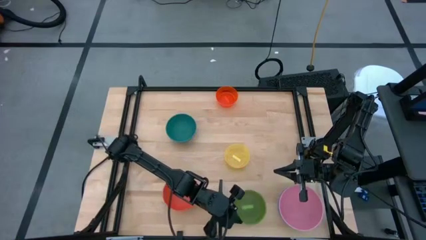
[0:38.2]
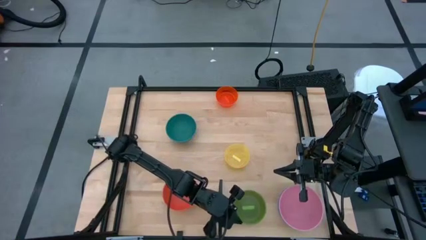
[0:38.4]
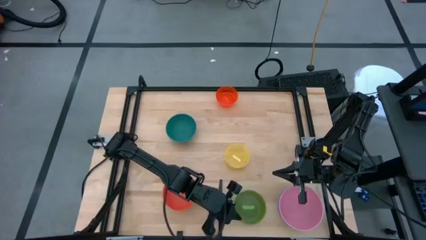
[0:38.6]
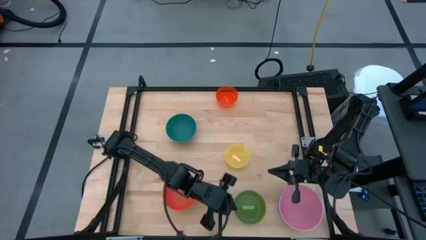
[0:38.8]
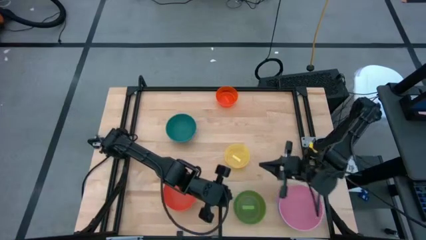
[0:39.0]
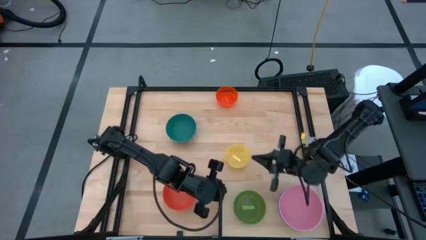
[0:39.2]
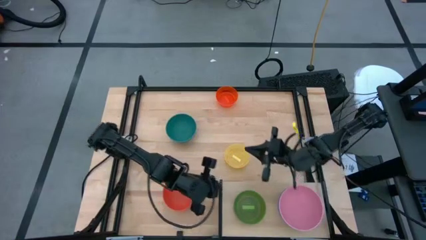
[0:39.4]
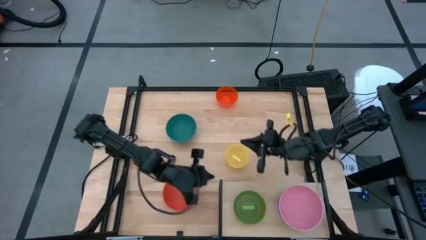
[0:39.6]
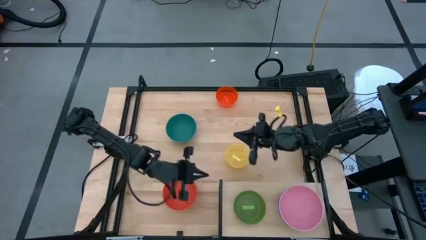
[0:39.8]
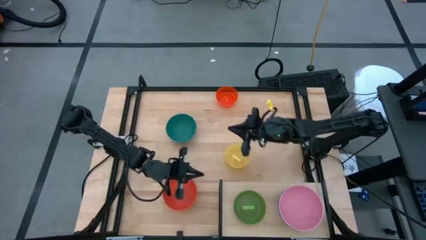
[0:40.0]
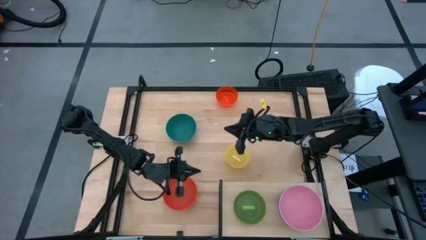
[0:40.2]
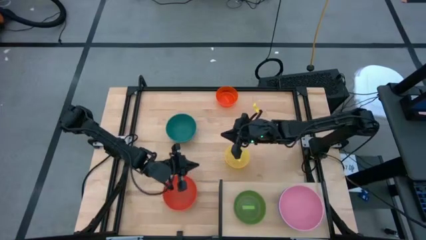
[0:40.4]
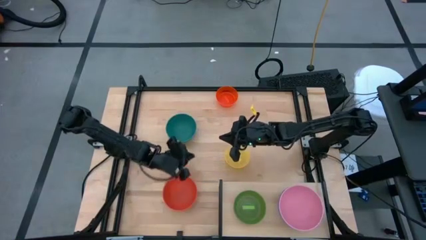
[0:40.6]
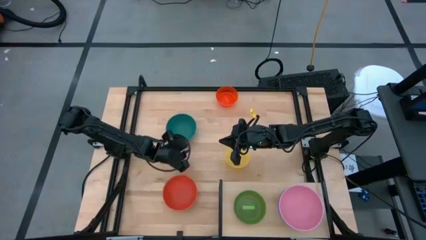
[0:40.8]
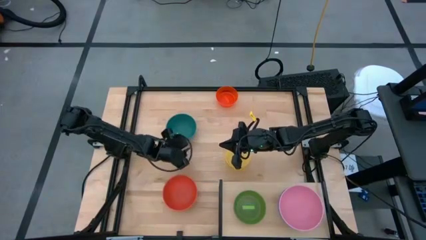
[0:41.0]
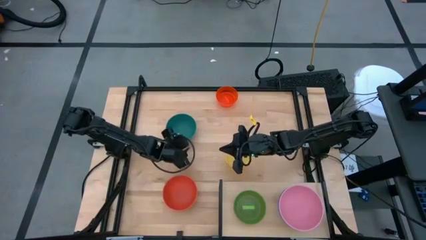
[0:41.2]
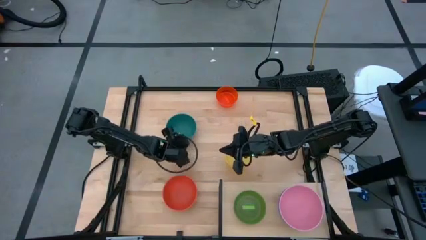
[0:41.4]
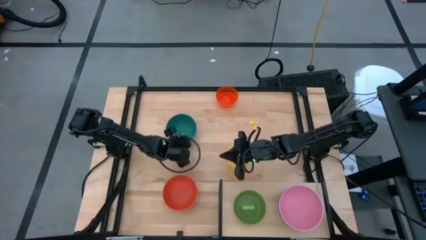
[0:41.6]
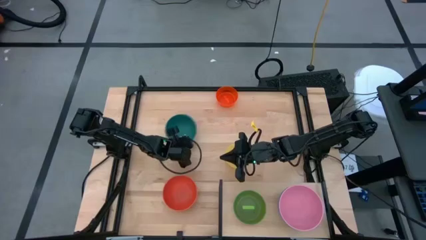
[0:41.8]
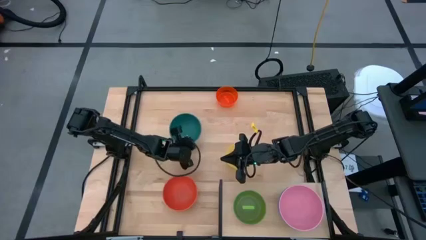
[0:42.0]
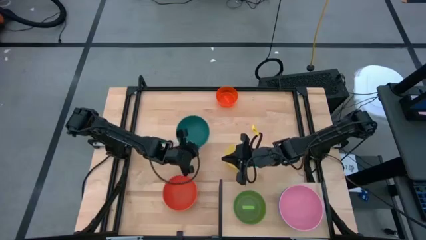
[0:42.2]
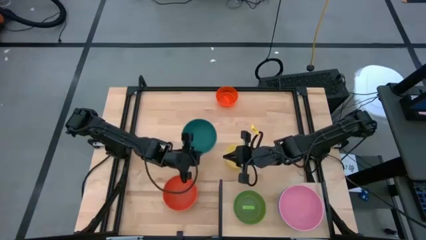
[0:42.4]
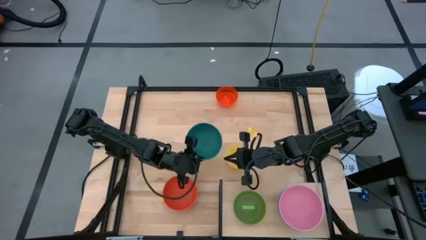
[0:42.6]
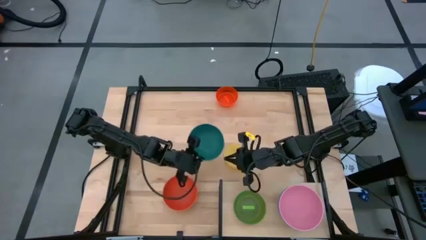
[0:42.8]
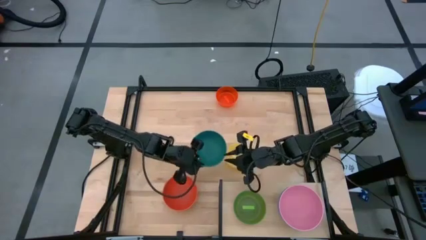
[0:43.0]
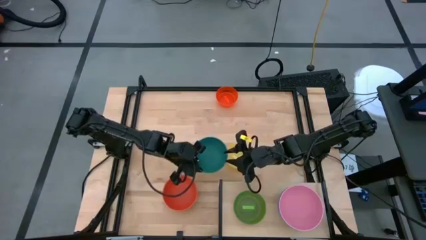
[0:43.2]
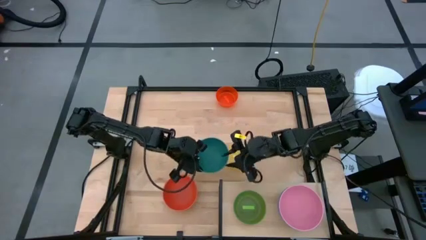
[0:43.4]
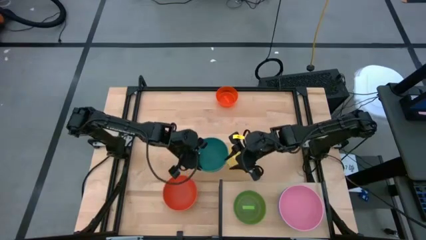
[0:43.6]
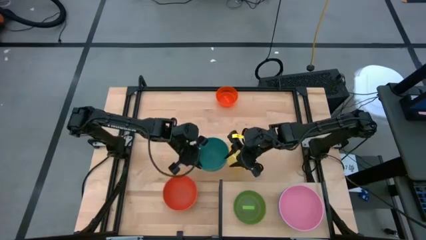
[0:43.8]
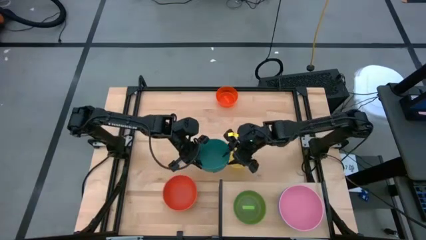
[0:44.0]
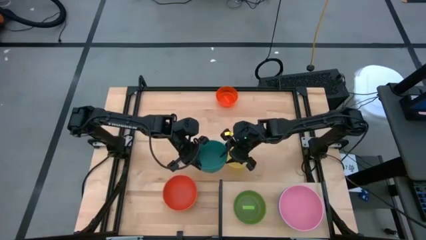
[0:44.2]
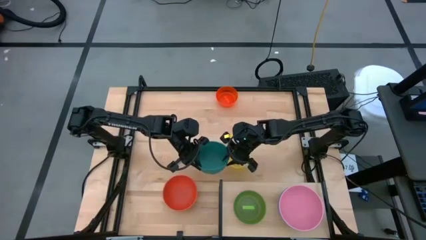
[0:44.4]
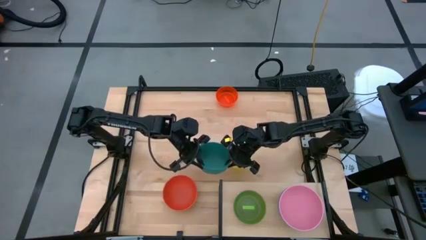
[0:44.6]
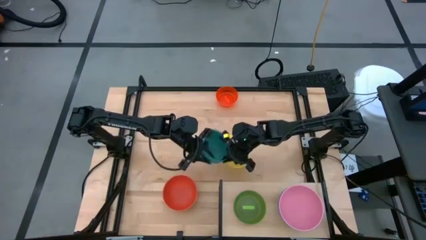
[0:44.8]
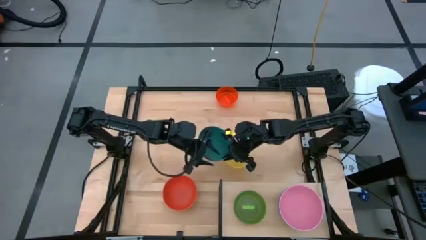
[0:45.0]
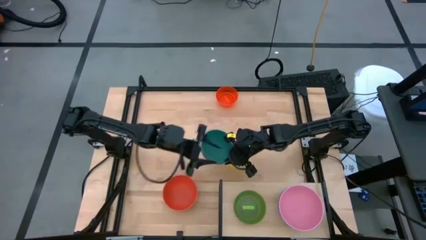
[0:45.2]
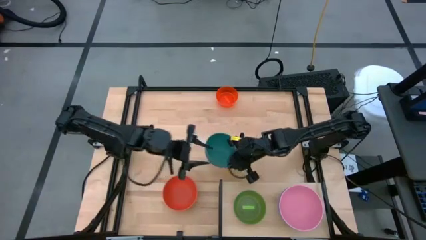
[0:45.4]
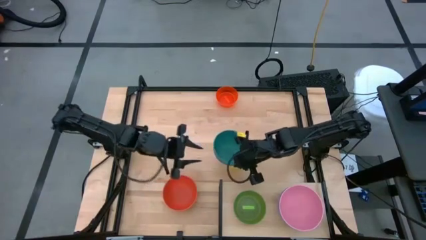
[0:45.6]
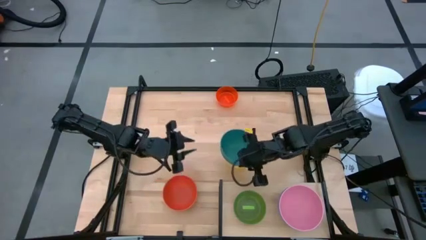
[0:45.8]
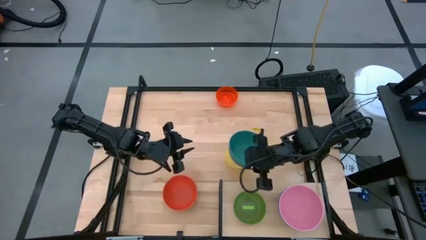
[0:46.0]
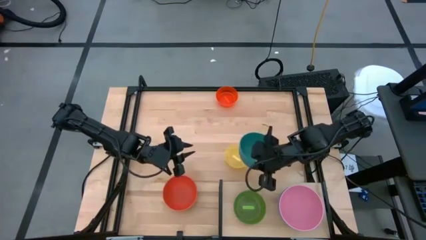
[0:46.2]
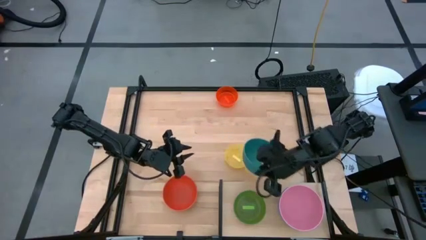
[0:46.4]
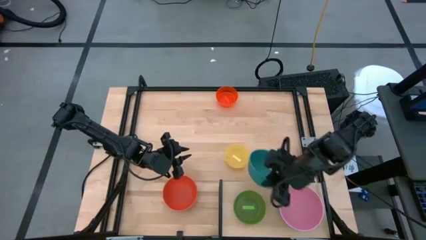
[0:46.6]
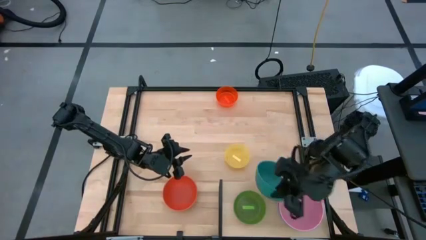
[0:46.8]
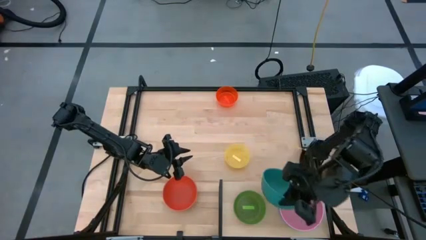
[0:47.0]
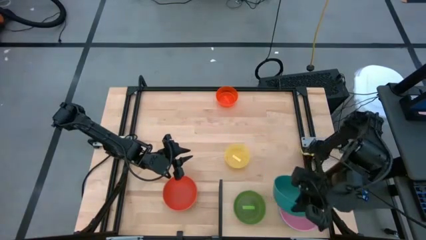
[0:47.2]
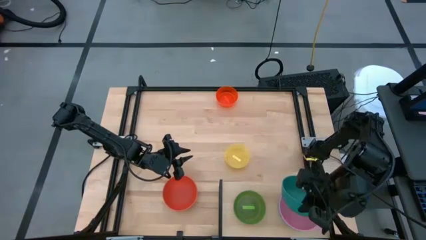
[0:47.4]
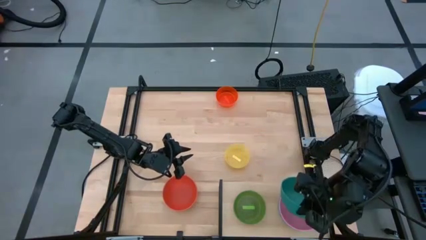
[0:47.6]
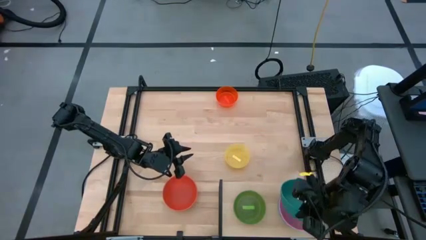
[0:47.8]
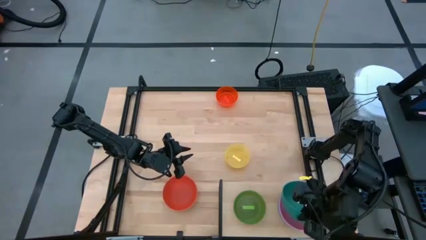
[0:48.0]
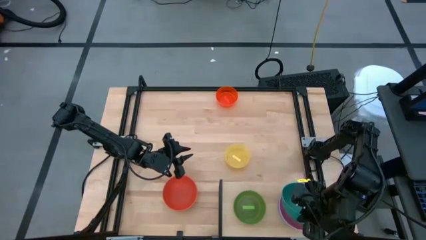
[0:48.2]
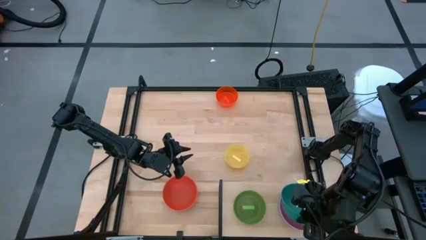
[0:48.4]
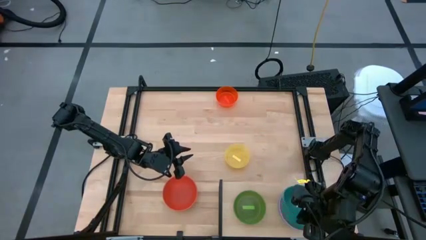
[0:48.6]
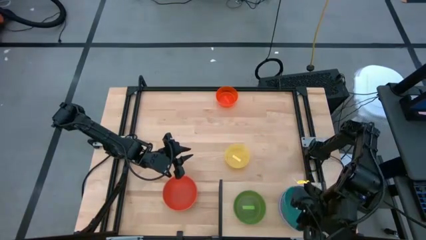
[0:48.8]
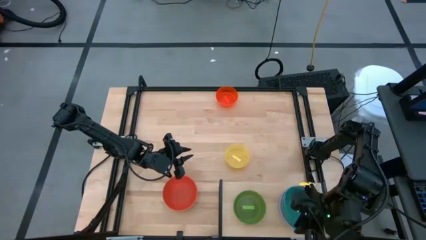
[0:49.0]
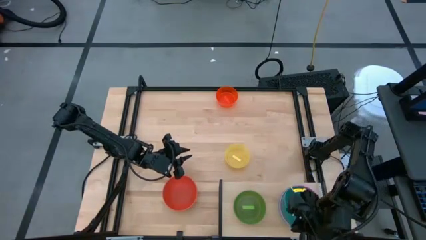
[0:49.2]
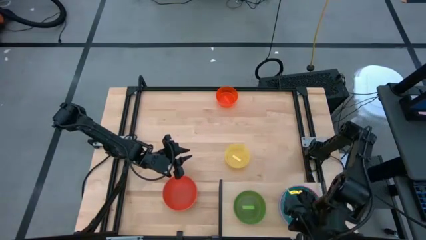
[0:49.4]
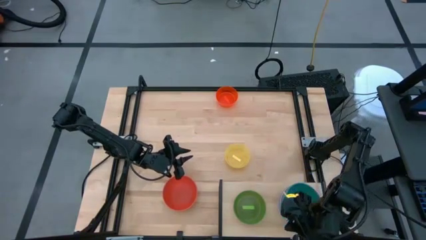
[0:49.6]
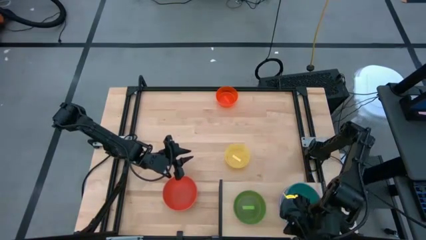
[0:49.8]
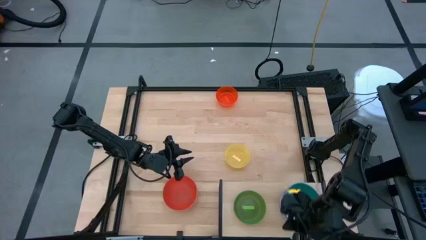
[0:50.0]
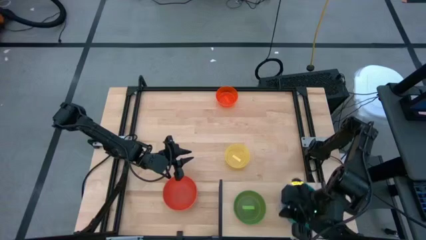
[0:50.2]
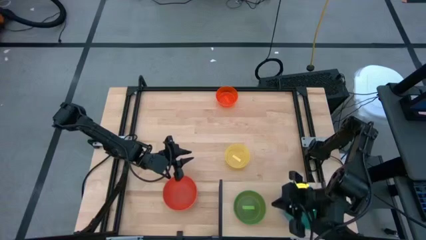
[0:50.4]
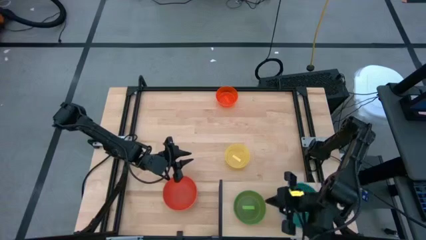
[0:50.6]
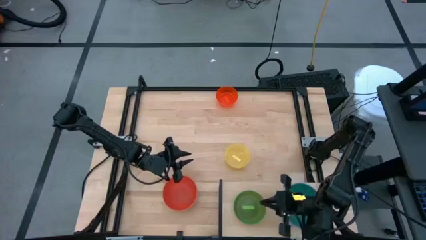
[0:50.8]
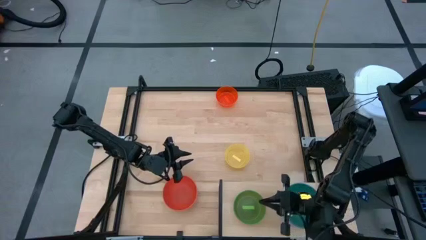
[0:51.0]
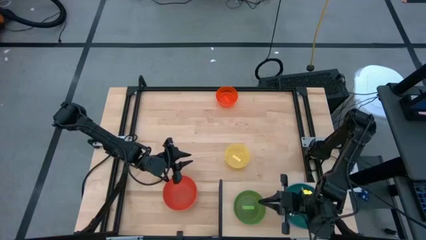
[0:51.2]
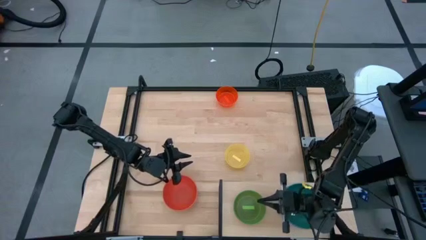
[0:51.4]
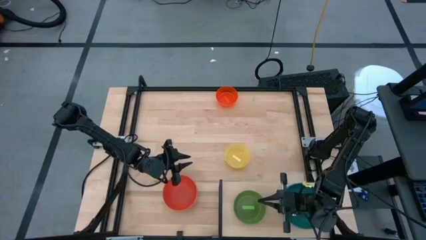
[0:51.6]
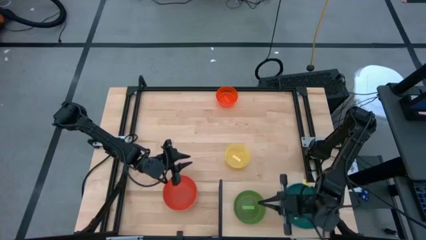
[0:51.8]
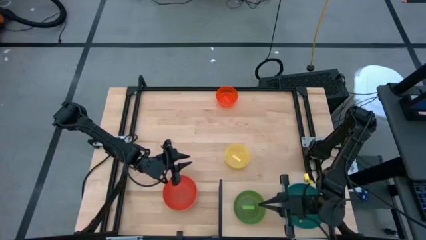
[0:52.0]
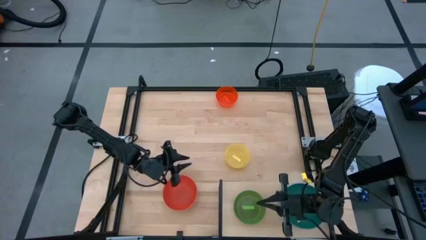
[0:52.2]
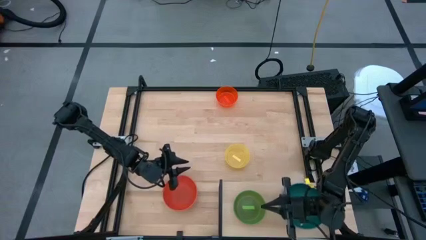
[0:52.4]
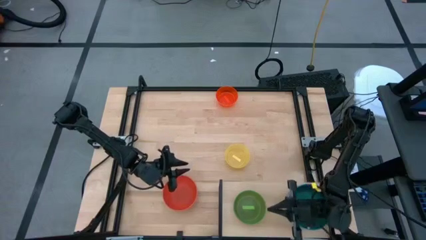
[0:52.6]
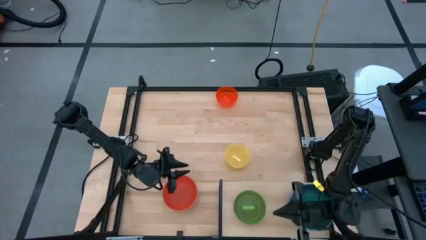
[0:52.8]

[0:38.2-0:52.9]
Task: Place and stack bowls onto a shelf
Stack the green bowl on top of the pink bowl on the shelf

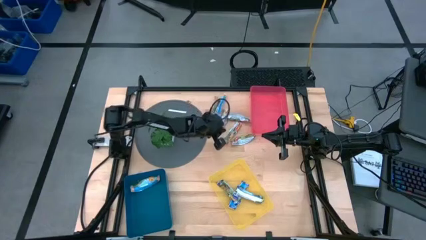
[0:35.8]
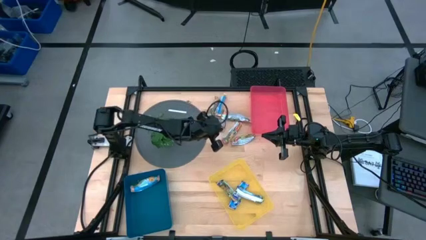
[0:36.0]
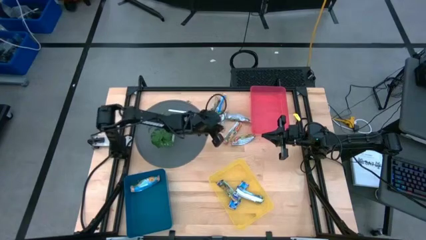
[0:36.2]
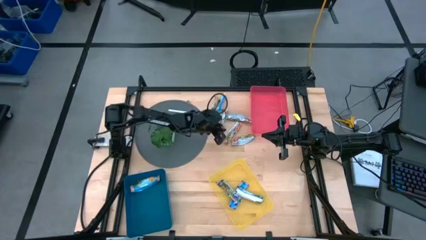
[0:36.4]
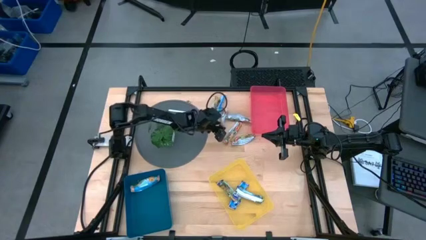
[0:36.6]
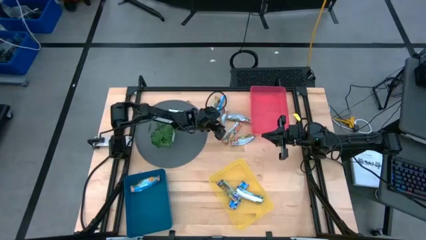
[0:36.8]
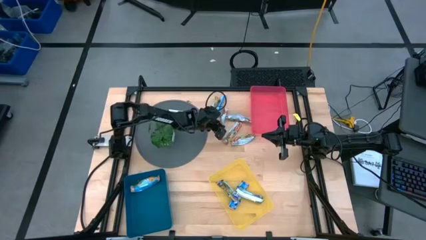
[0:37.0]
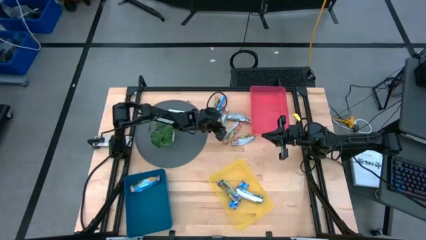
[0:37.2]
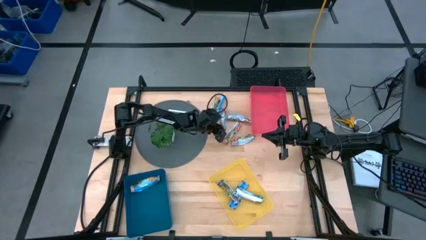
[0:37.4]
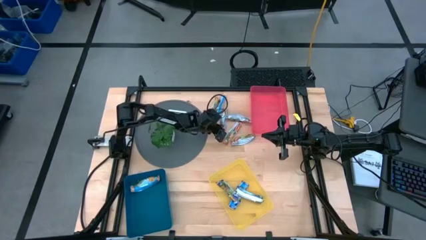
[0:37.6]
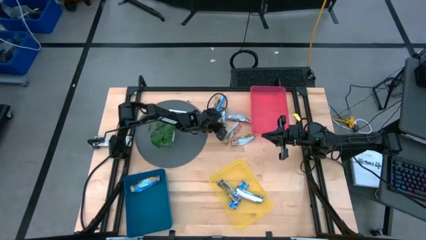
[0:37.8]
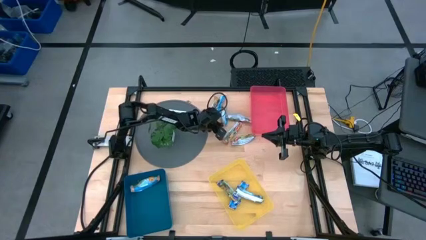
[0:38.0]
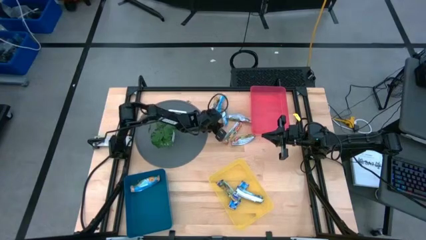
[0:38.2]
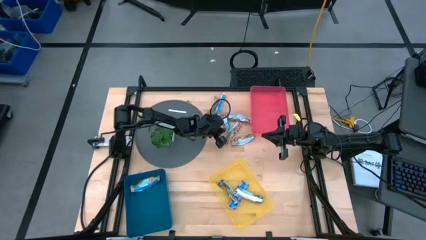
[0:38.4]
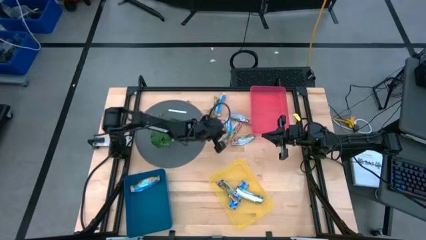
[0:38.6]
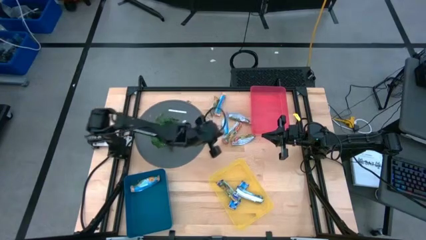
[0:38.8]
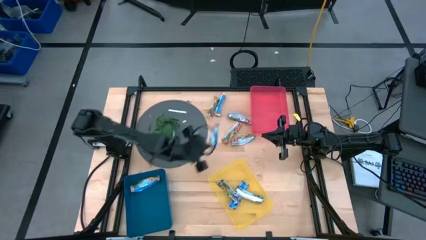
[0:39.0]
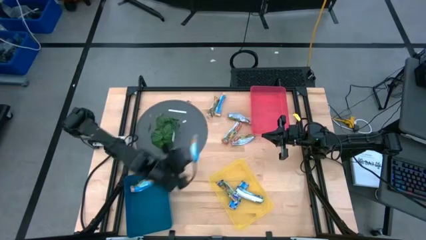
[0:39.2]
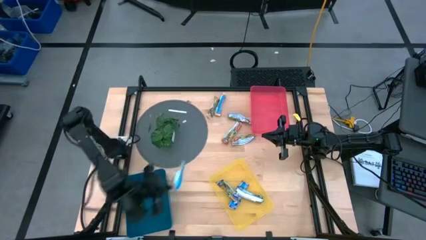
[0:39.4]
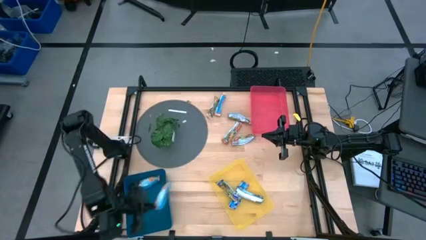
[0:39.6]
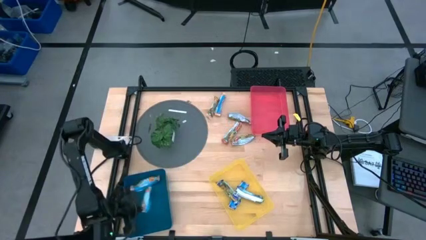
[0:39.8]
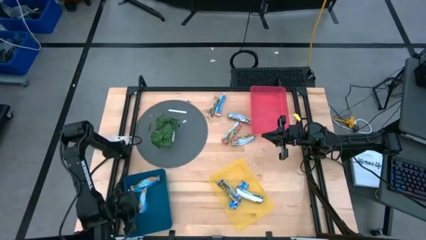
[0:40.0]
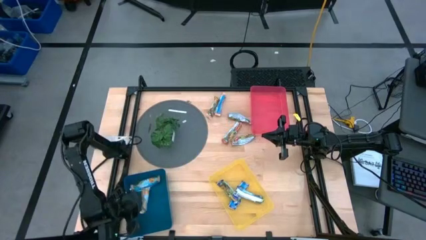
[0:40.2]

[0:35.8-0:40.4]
Task: Pick and place Granola Bars by type
Put the yellow snack into the blue bin
